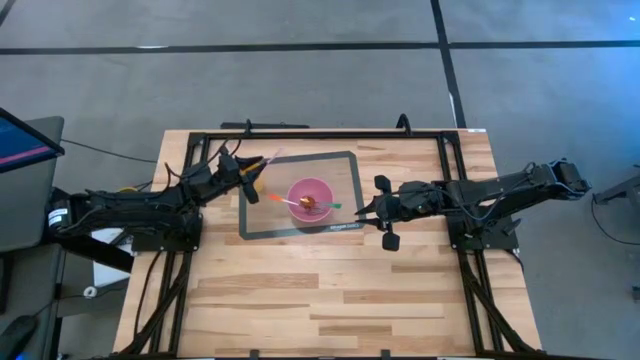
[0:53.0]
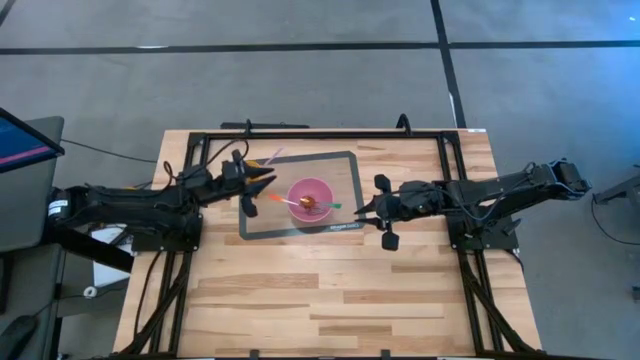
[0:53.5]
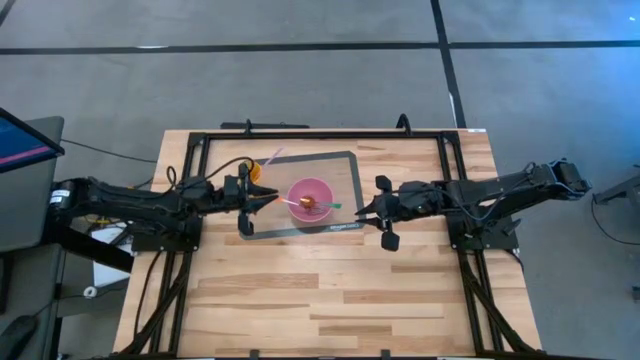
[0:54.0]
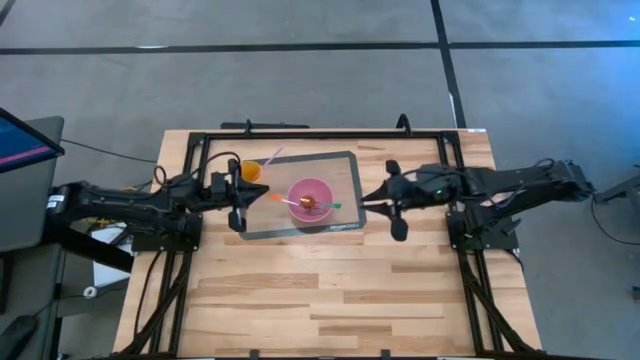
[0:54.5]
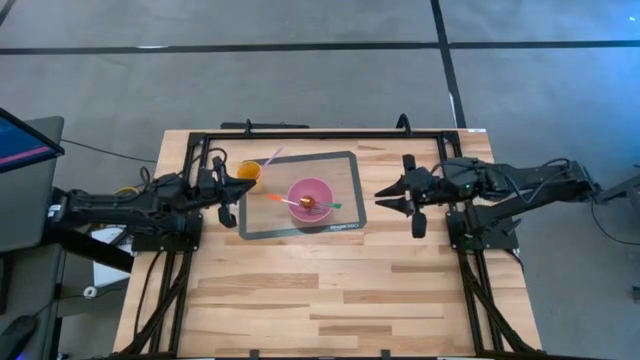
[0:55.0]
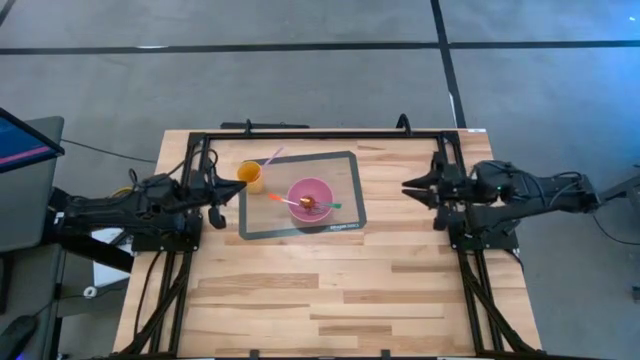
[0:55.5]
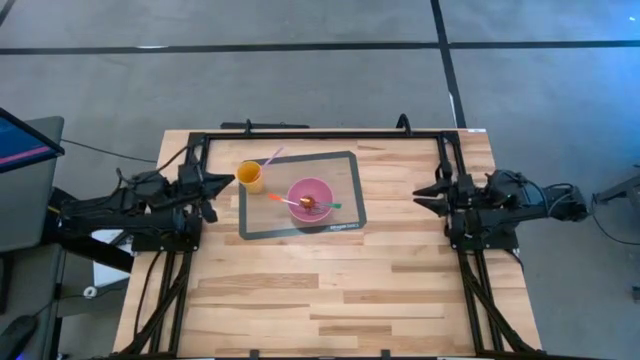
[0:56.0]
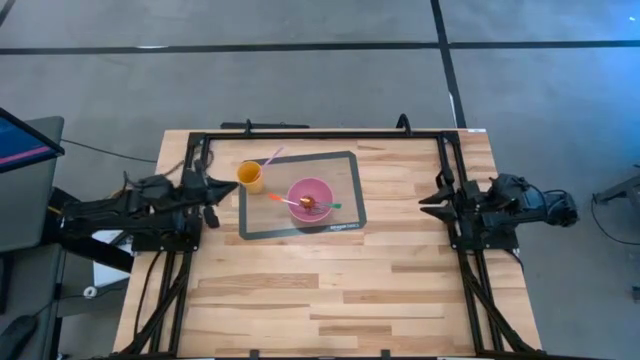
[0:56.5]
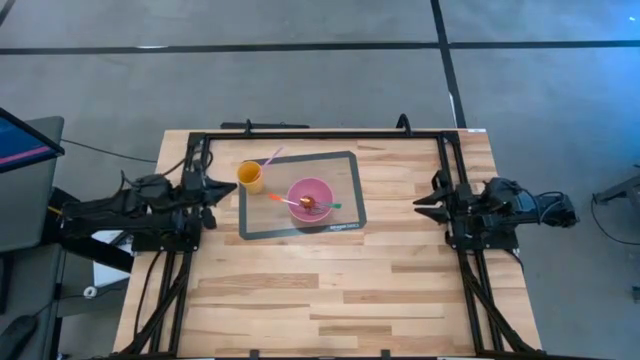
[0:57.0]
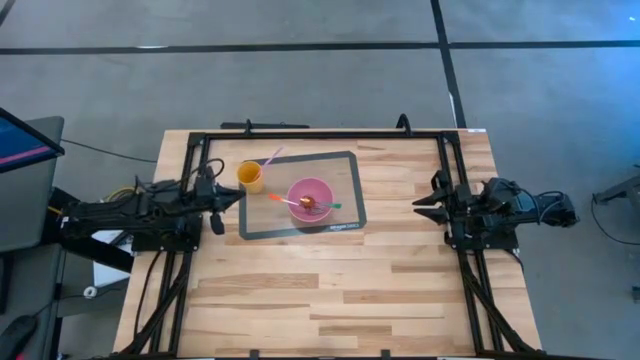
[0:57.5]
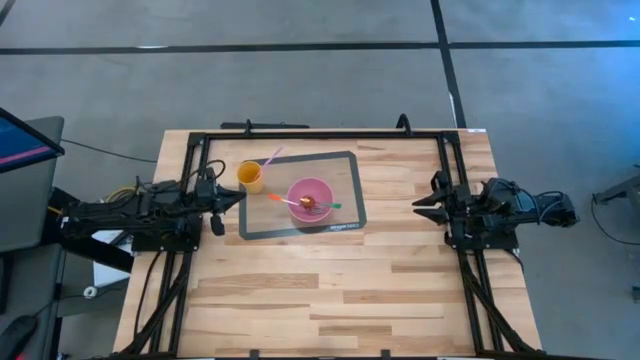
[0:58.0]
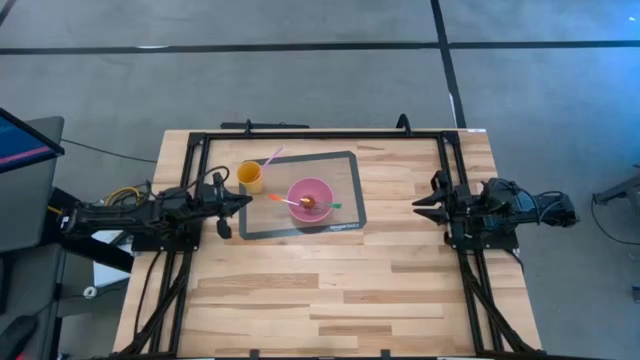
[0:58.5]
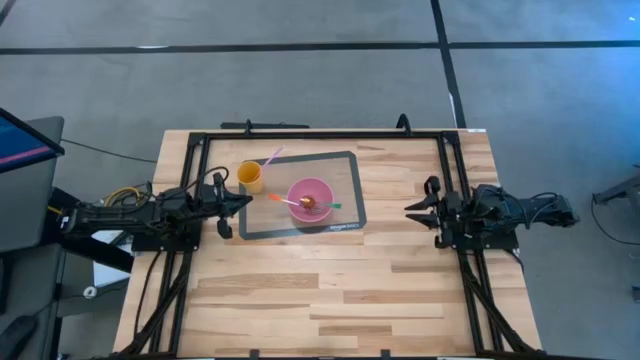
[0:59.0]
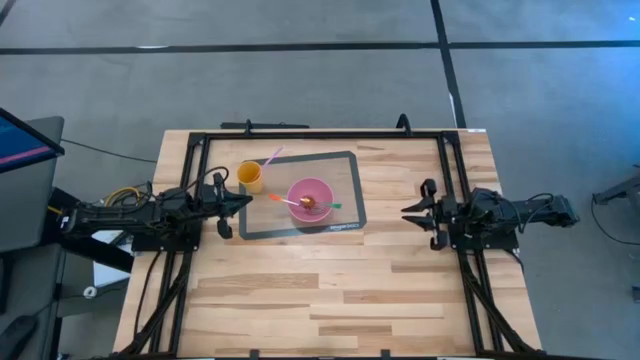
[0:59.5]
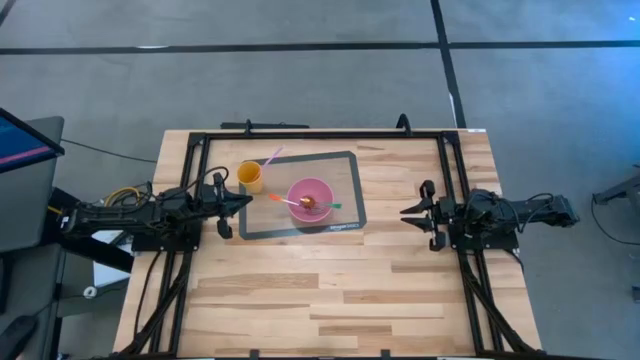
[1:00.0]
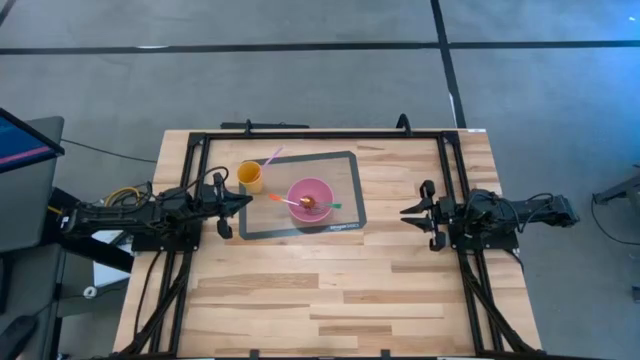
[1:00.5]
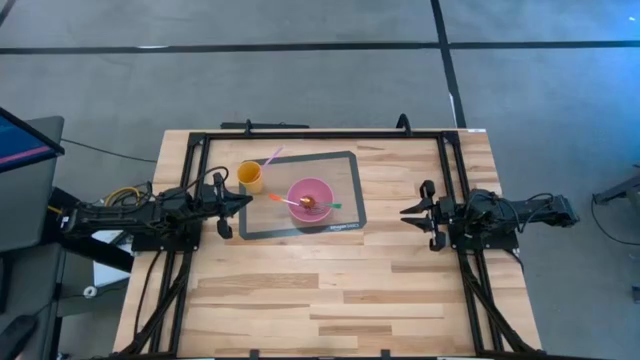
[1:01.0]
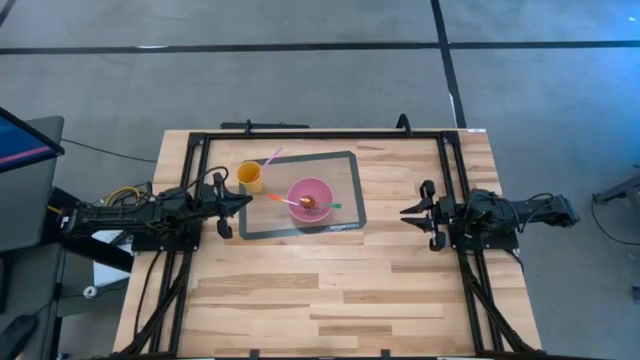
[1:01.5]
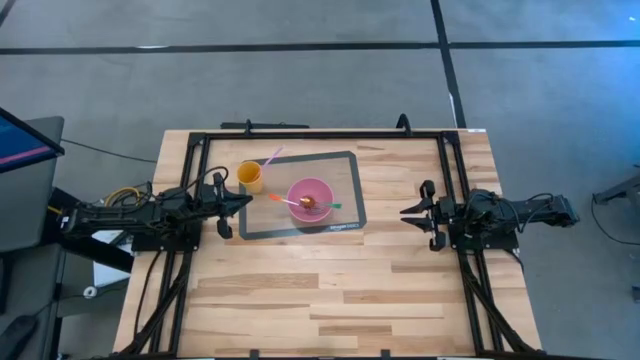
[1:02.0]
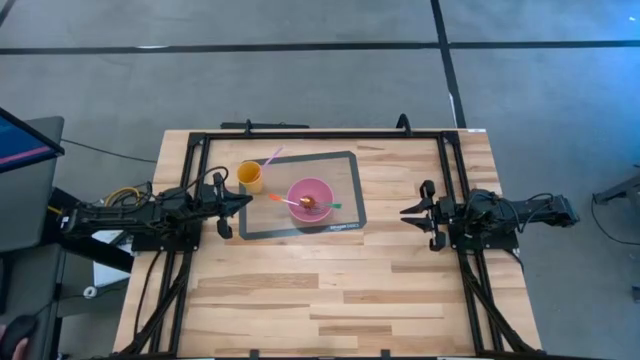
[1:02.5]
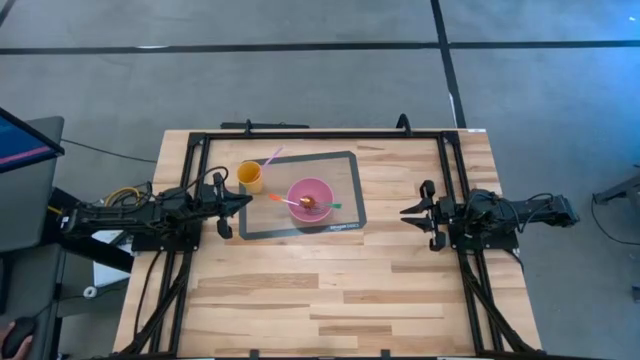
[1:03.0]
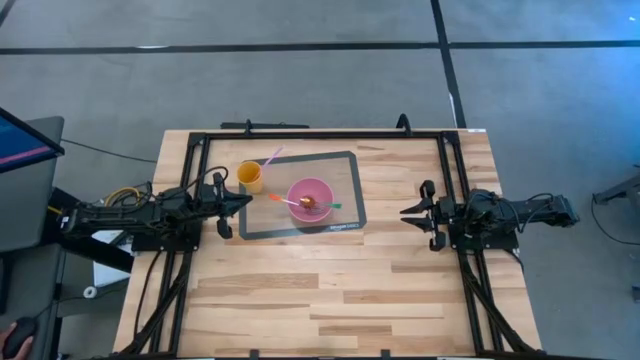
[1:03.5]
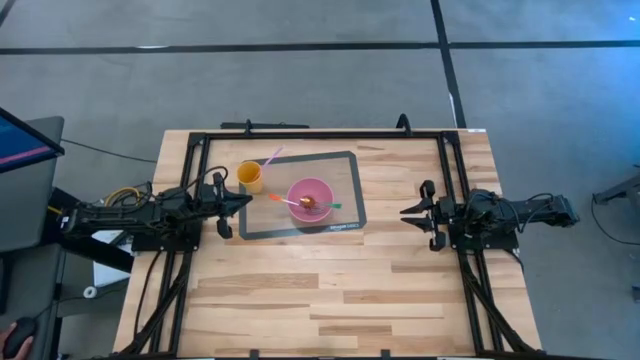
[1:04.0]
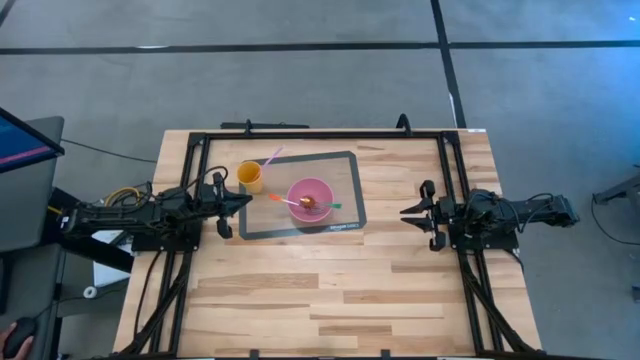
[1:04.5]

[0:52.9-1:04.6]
Task: Pick & Place Utensil
Return to Home Position

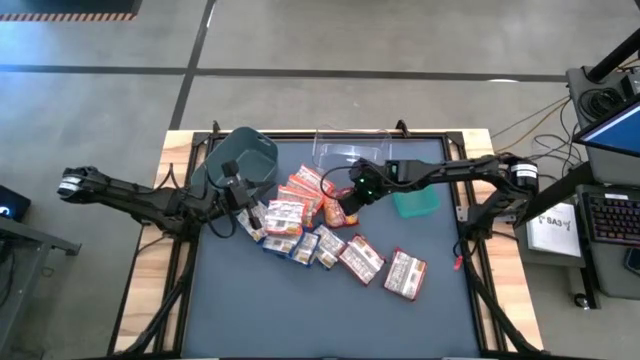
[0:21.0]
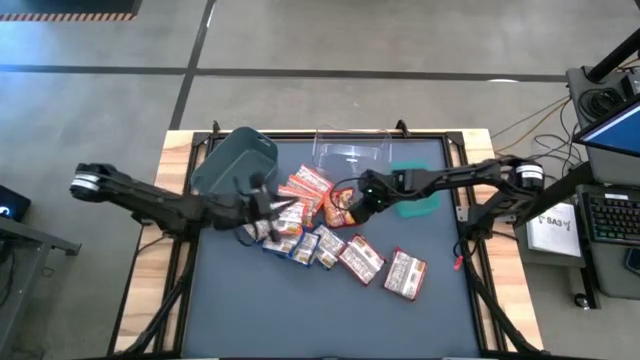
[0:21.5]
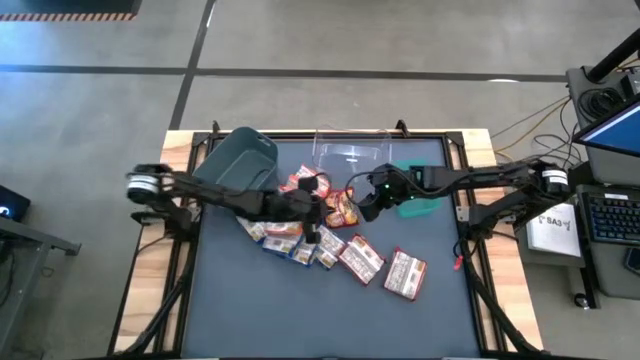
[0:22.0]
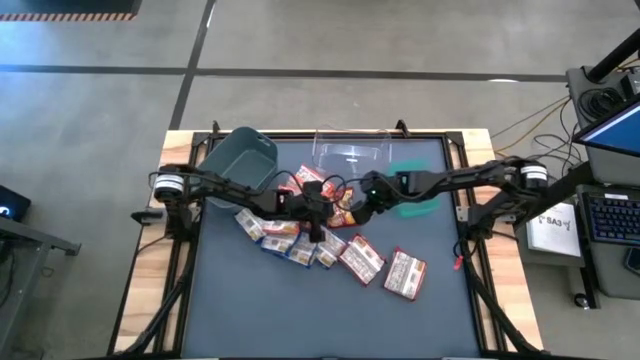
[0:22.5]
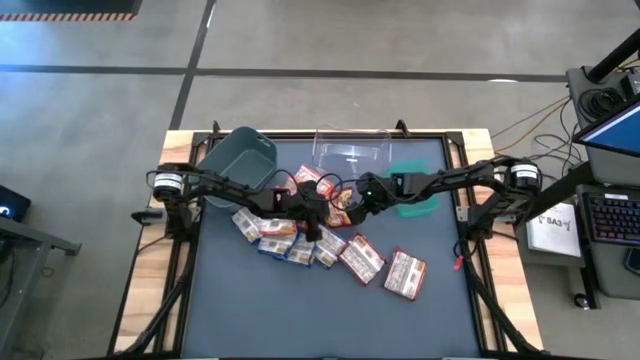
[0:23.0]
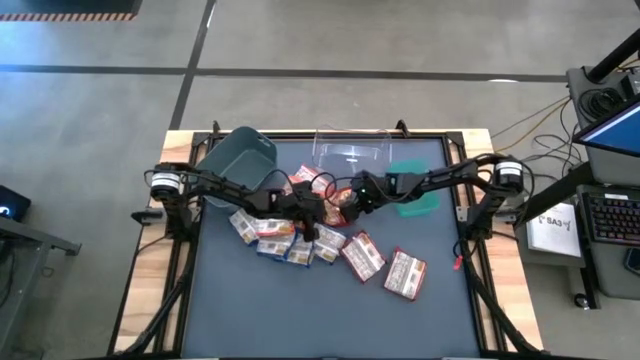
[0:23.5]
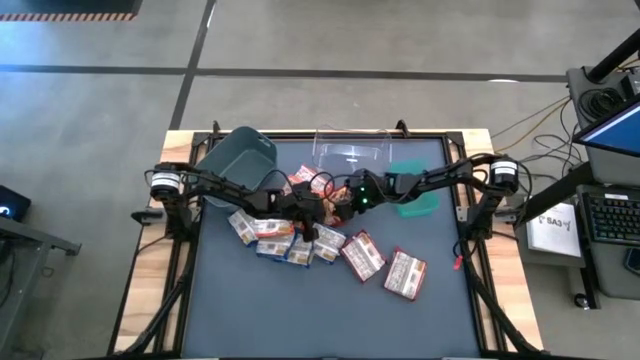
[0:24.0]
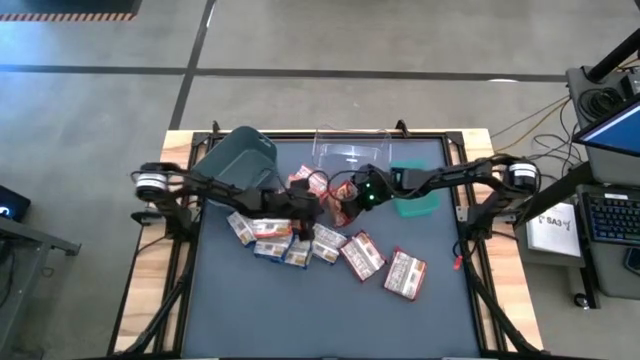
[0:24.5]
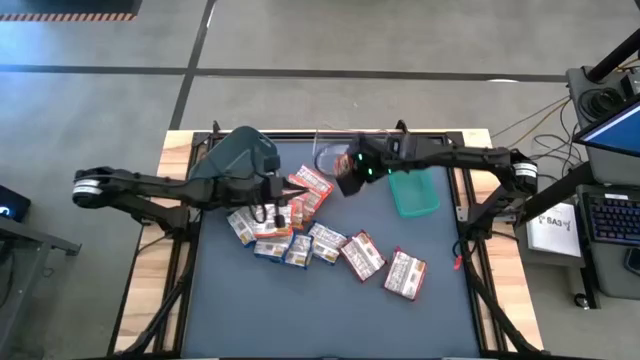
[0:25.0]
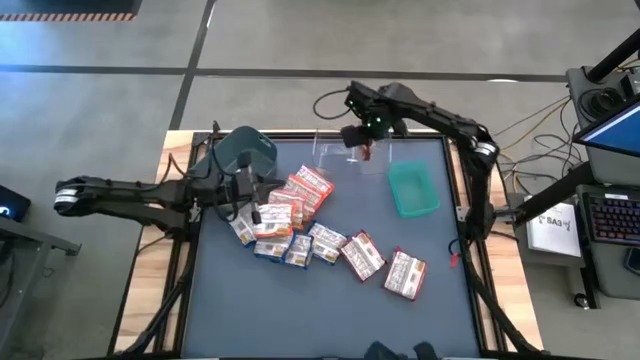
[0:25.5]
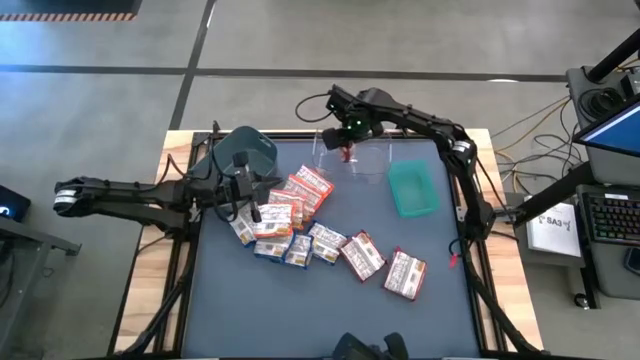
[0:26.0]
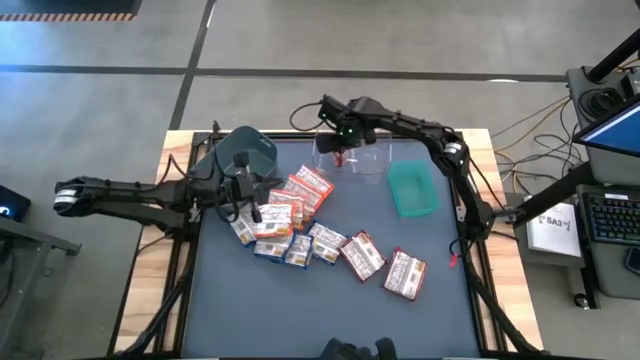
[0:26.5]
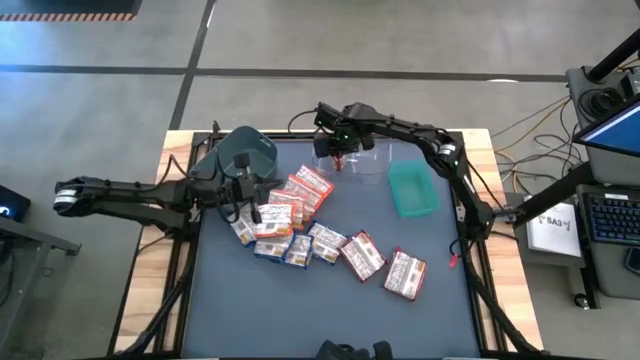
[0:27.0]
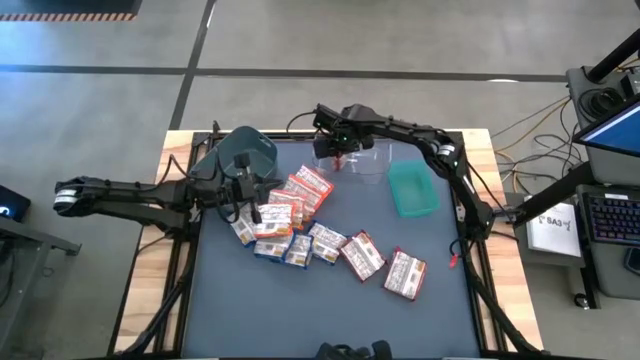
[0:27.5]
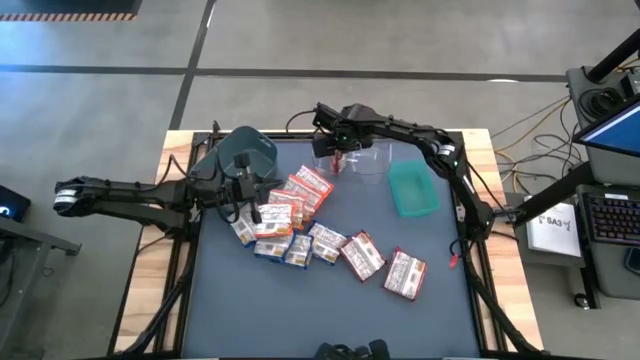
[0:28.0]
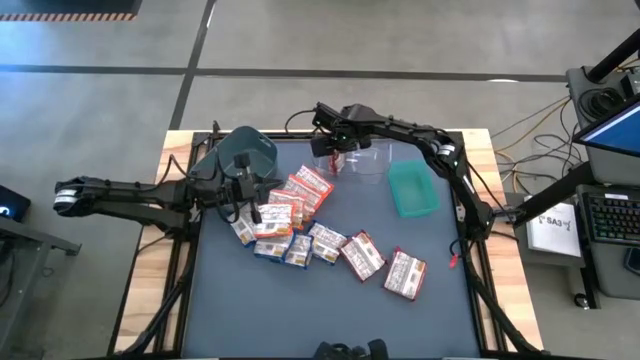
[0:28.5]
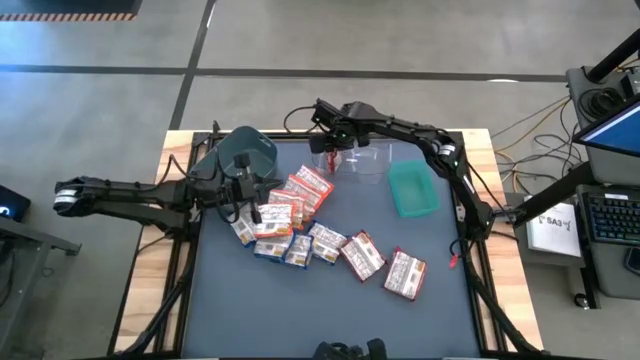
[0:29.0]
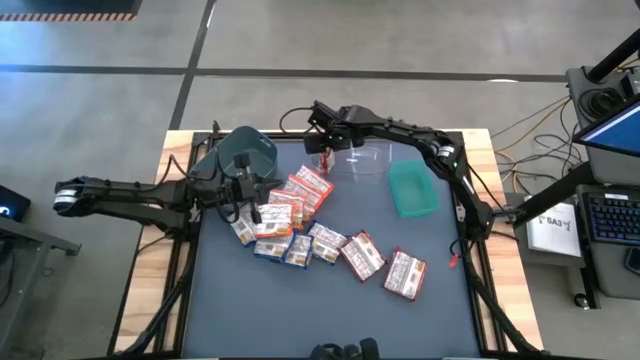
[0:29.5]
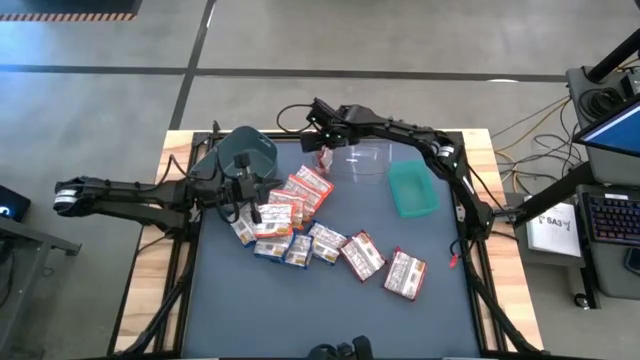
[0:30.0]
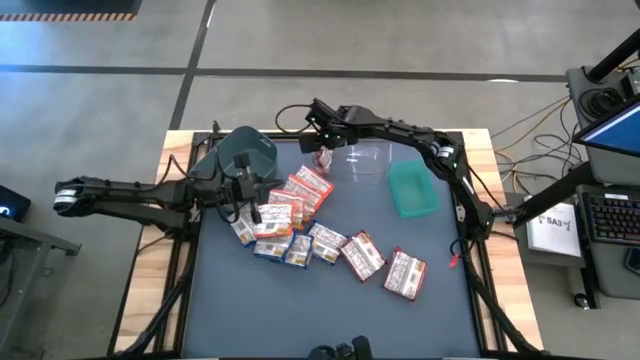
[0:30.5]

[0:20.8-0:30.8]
Task: Sort Maruchan noodles
Put the red noodle pack into the transparent bin
